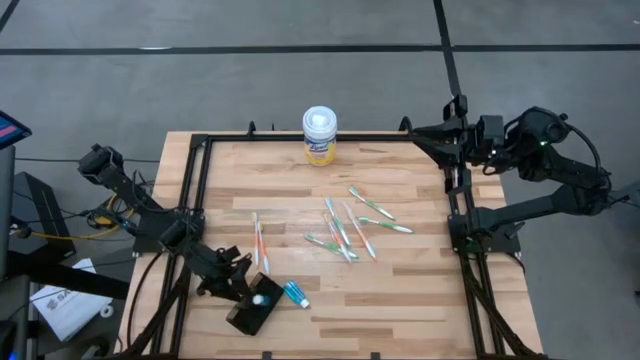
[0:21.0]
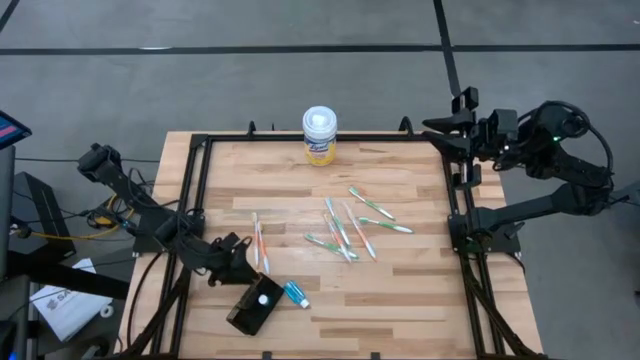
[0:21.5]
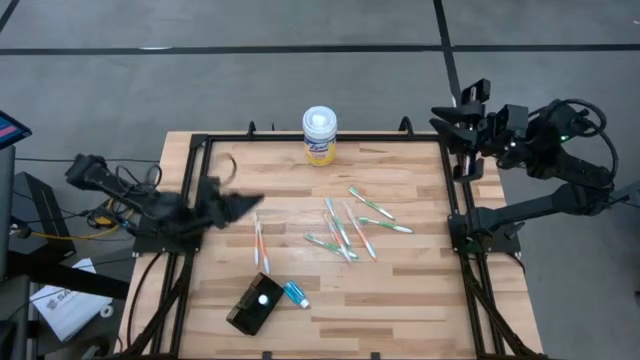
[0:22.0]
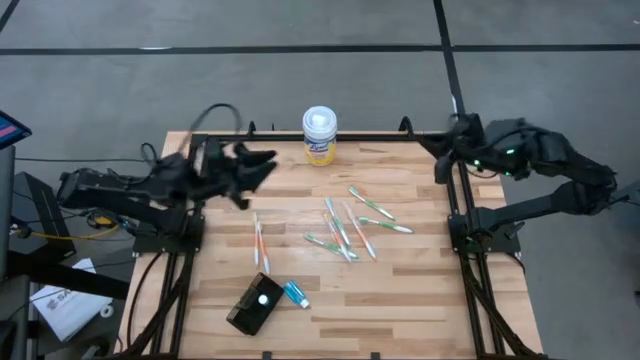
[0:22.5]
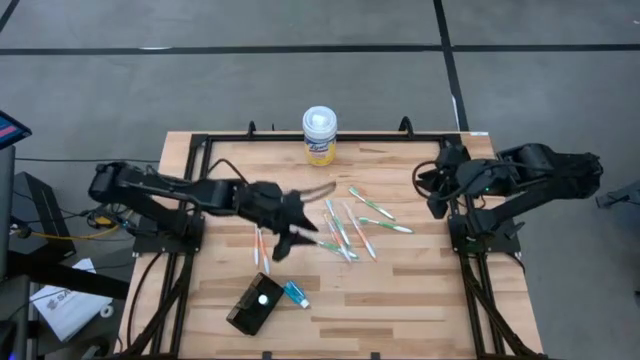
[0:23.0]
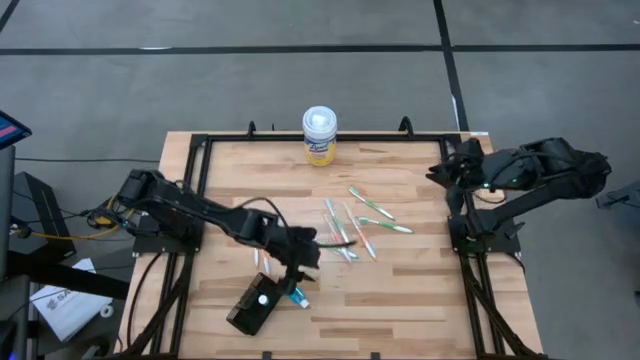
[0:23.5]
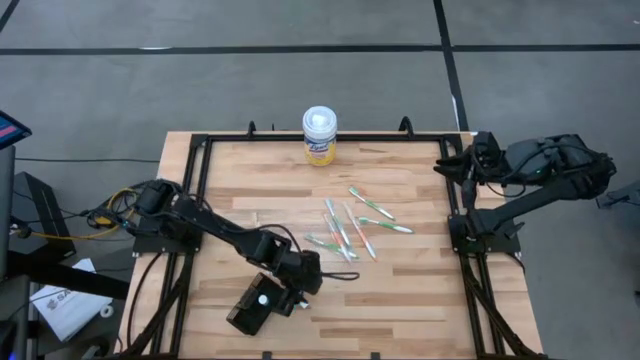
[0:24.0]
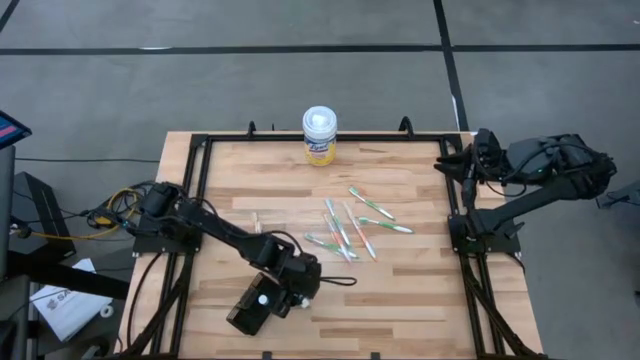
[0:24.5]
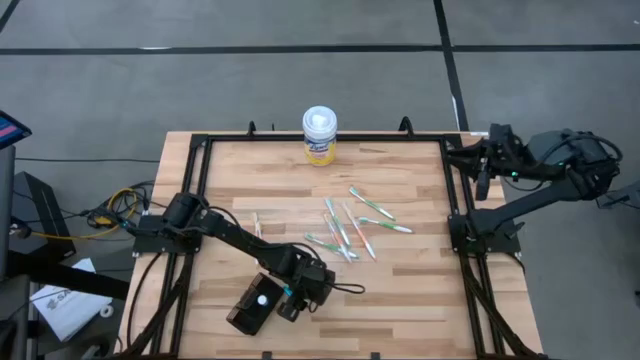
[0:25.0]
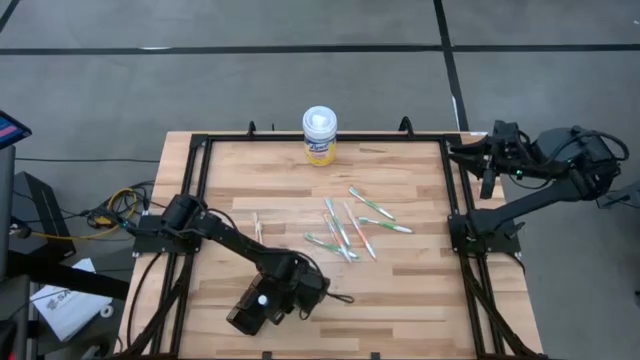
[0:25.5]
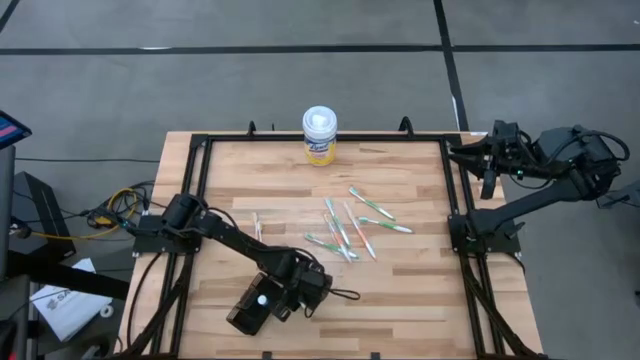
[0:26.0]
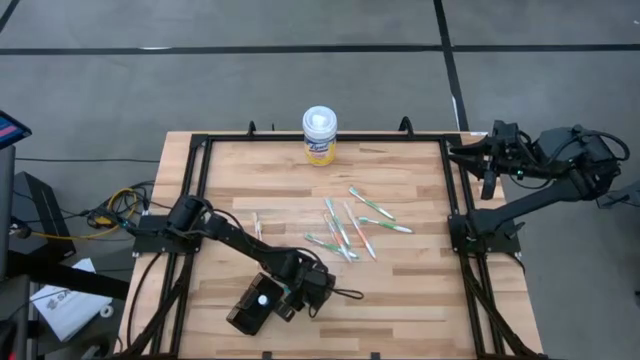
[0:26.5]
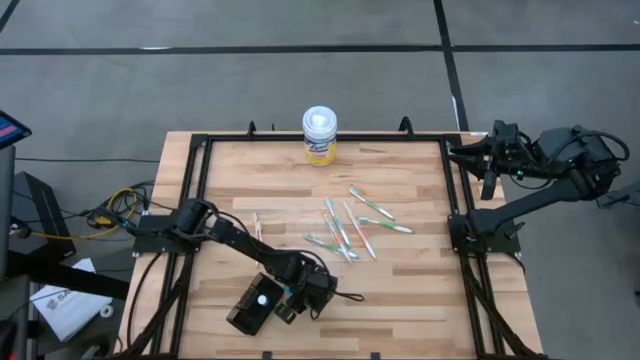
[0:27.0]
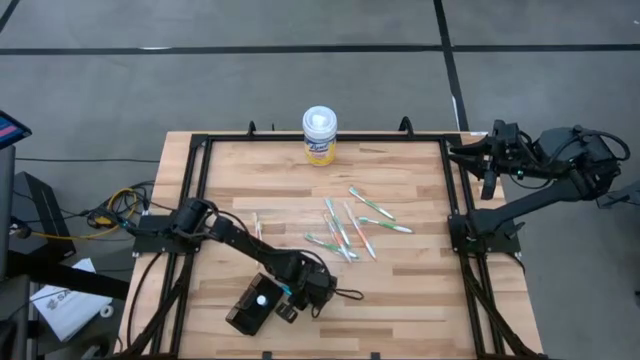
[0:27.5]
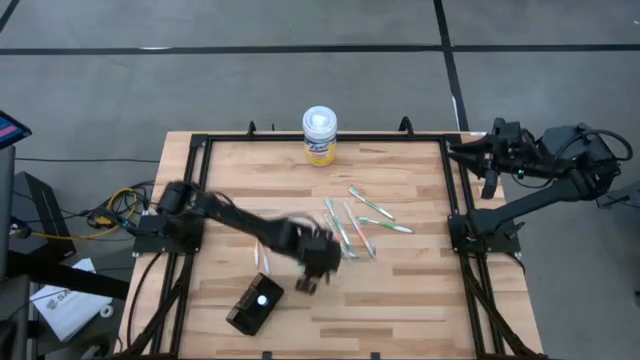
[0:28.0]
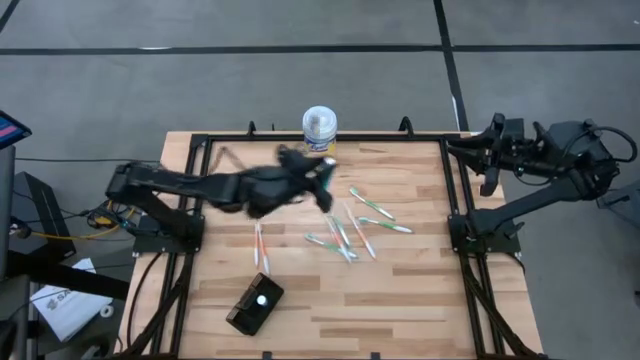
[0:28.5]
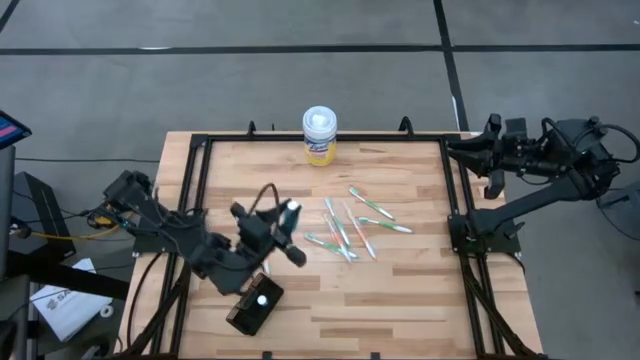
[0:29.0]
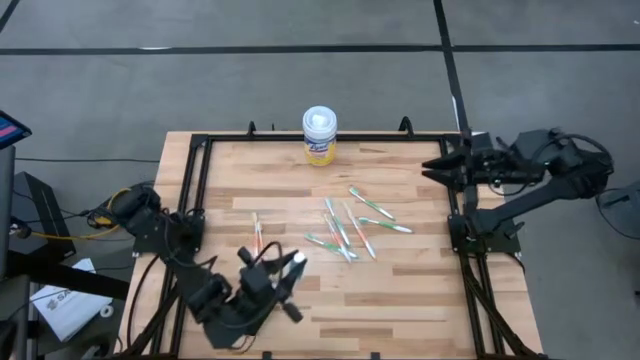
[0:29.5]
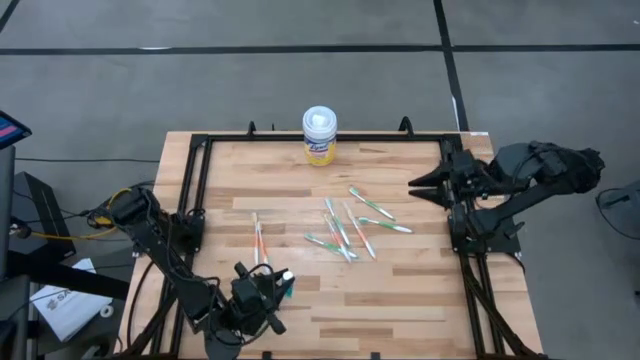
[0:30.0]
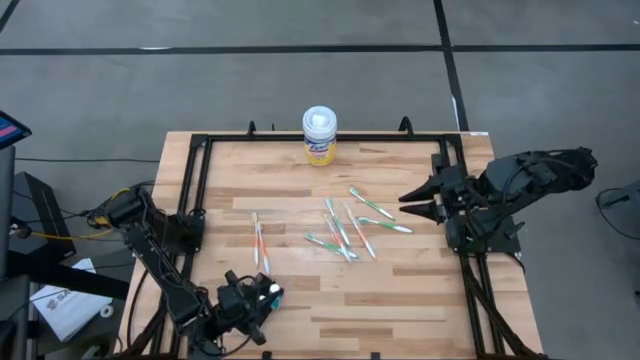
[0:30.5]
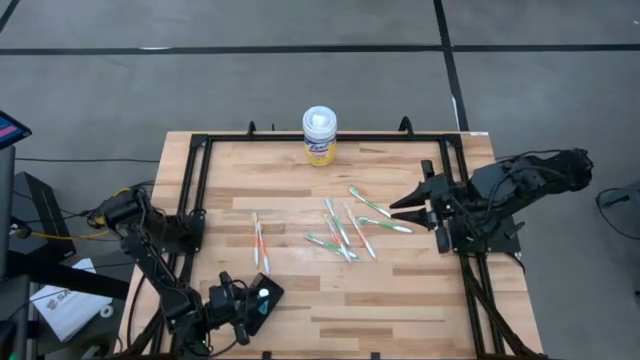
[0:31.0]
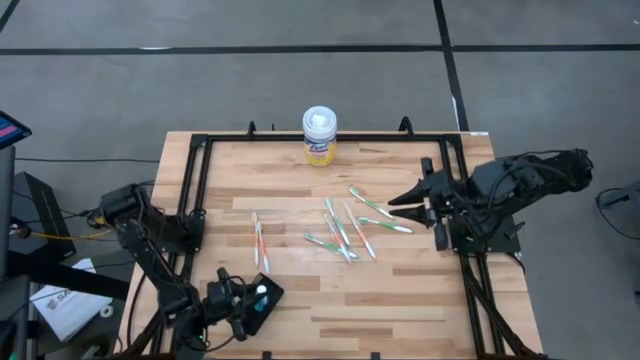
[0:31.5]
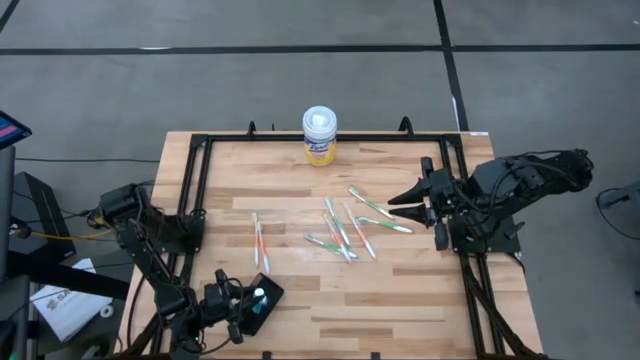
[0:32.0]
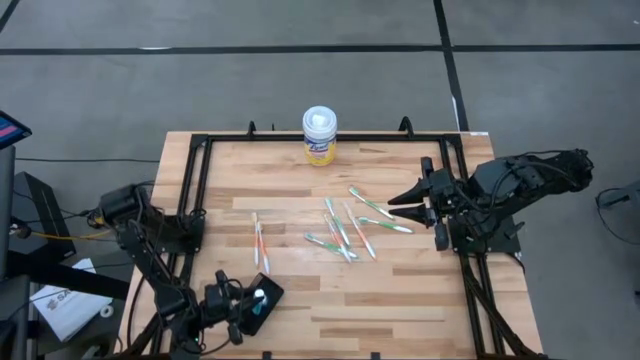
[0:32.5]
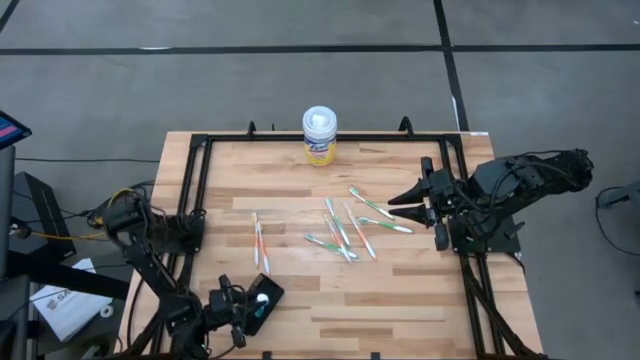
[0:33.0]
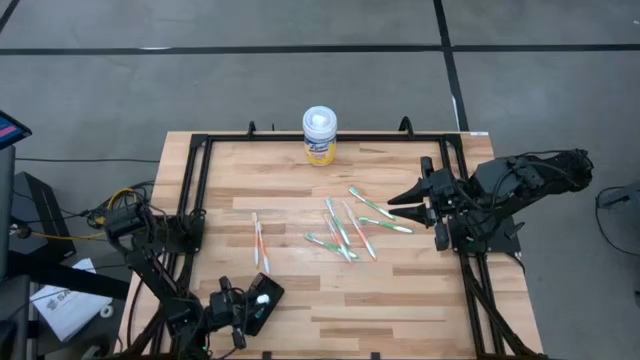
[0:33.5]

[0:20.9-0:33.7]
Task: Pick & Place toothbrushing station
Put the blue mouthwash into the black wire organizer bin

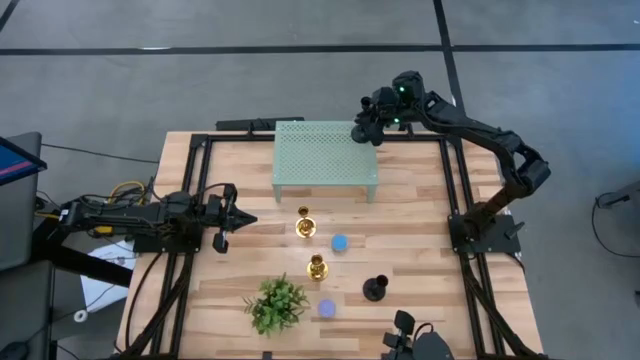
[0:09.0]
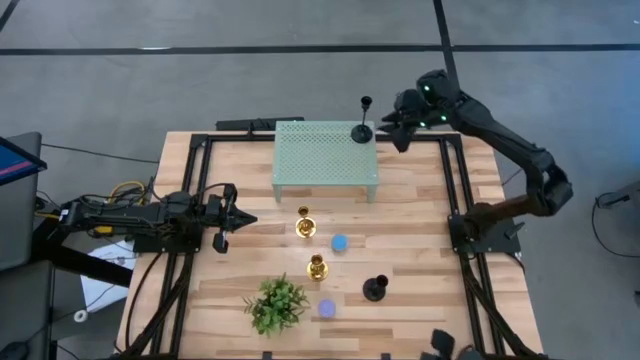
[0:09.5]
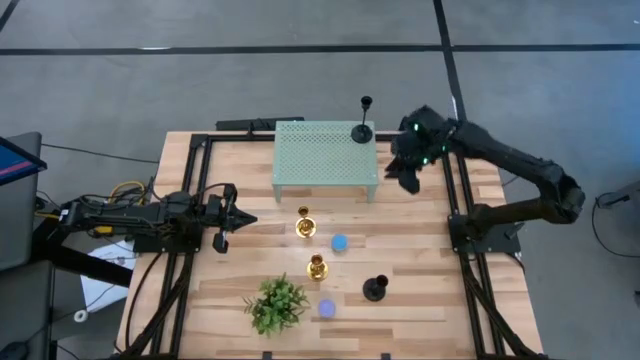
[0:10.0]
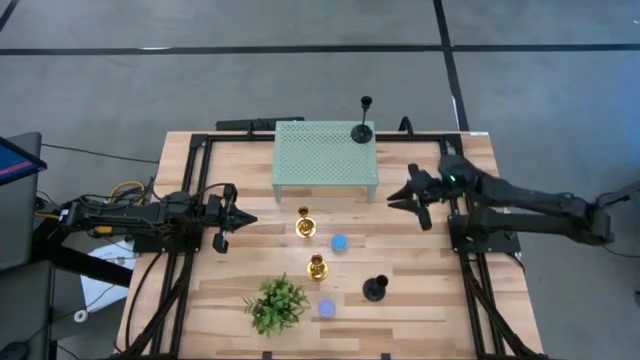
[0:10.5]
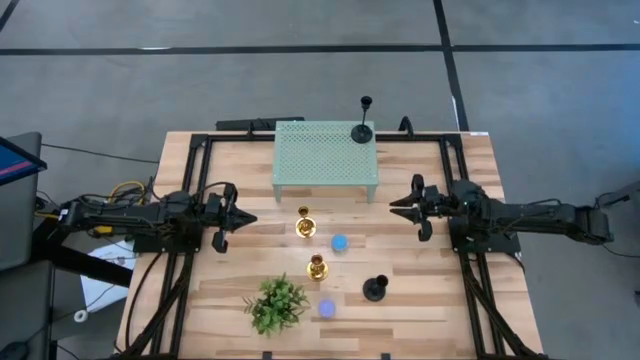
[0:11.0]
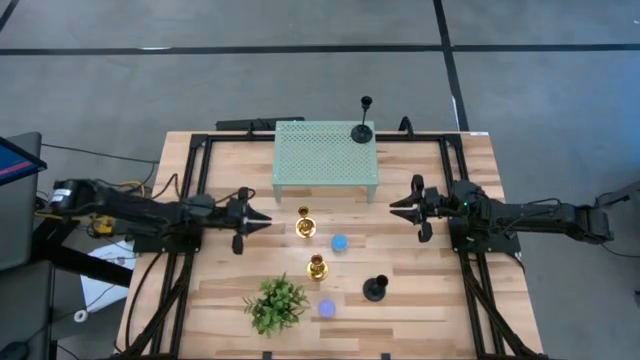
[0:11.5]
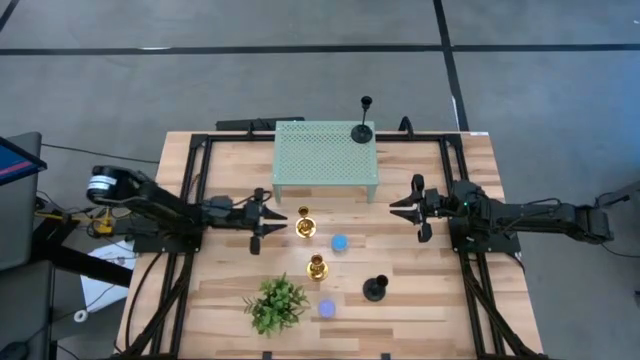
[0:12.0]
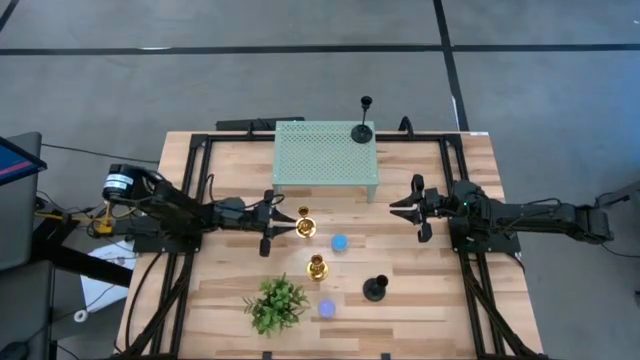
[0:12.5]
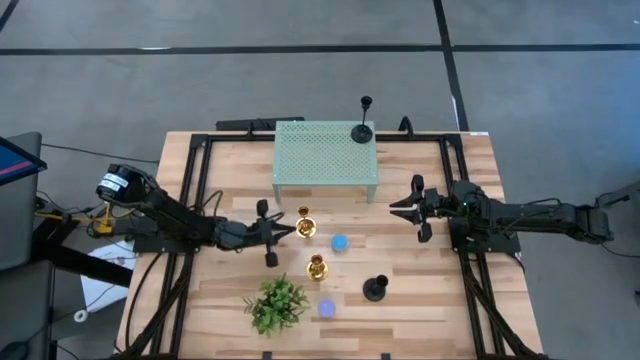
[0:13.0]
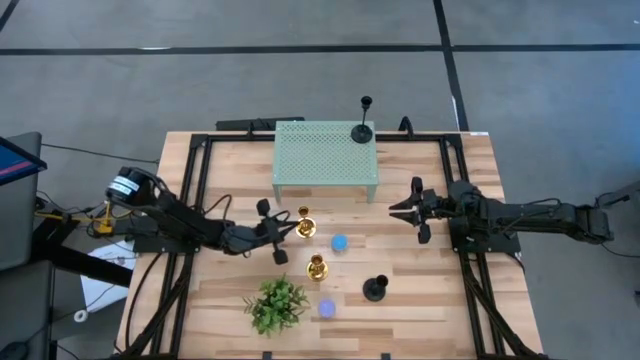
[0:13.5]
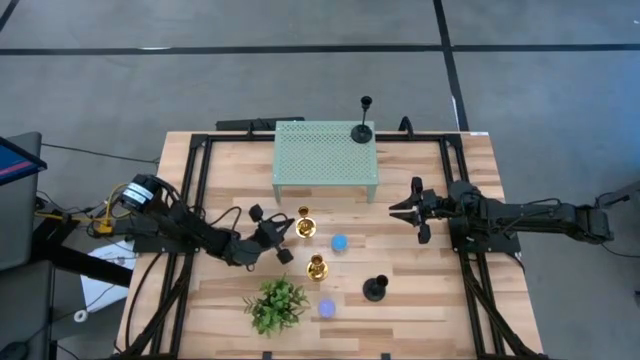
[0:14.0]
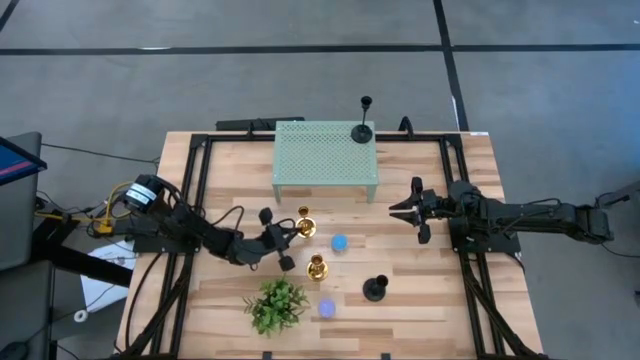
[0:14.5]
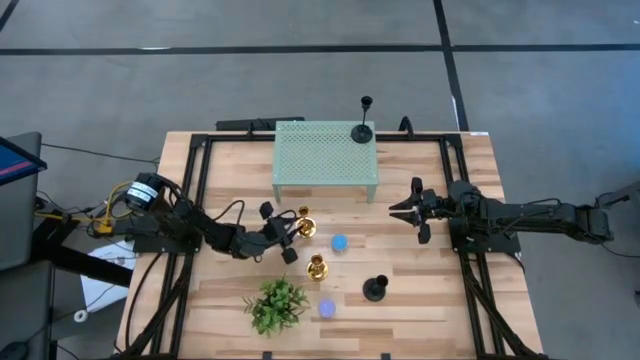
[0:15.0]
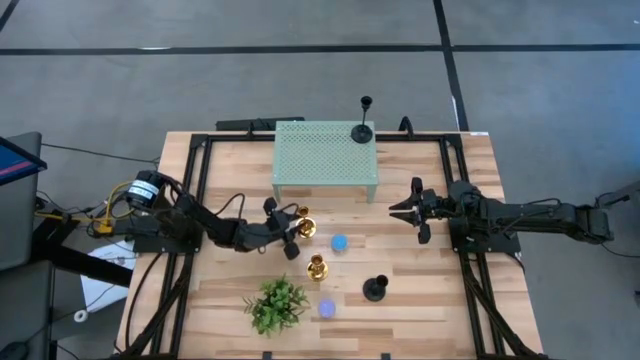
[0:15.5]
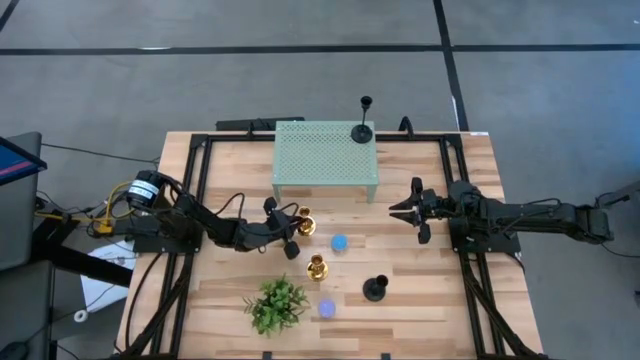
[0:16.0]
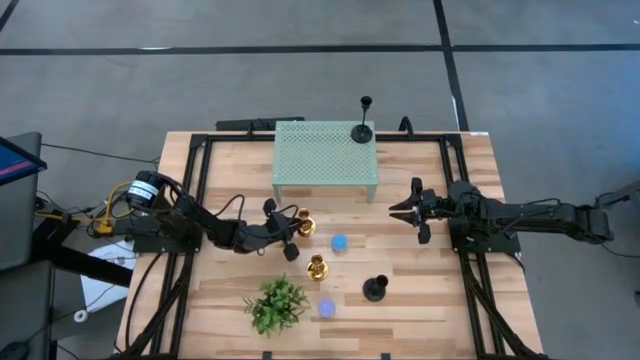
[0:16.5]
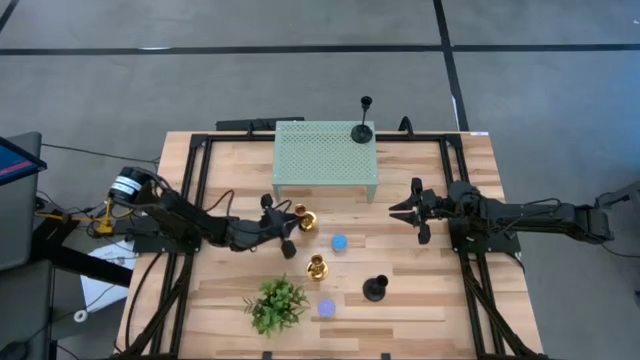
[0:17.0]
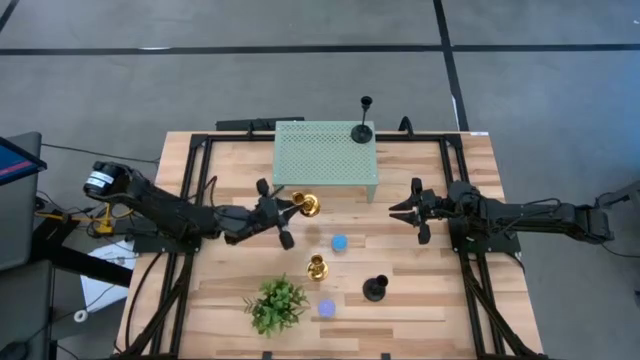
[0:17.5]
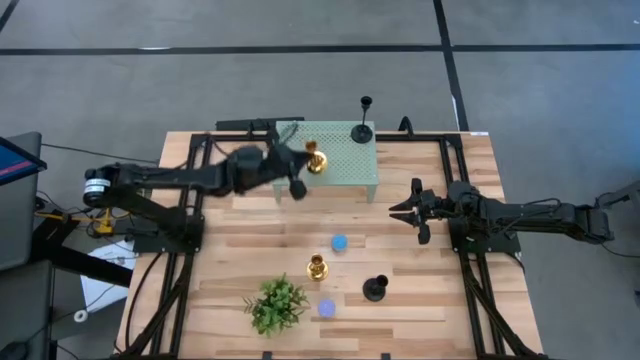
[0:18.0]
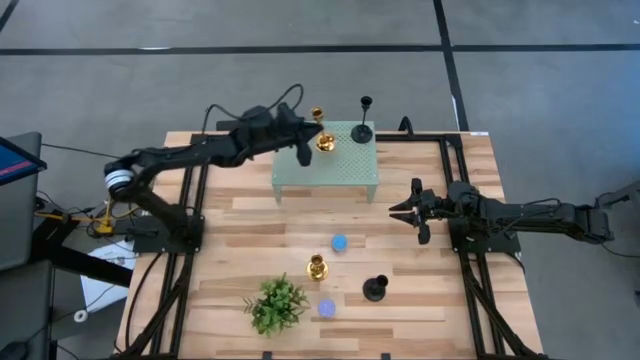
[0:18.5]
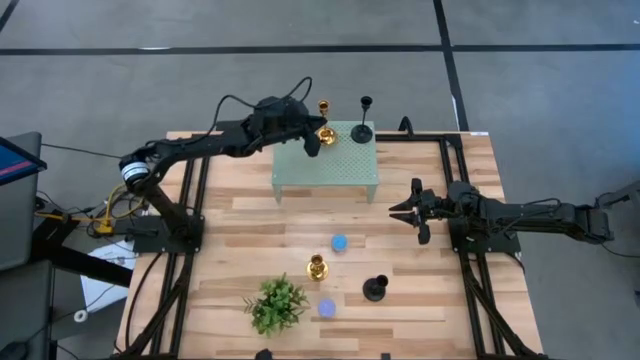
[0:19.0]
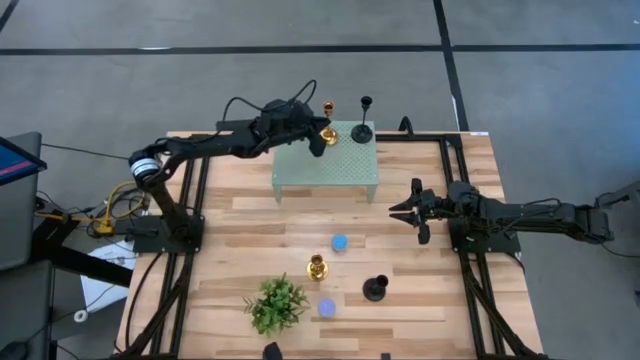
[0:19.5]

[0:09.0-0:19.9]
Task: Pick & Place candle stick holders
Put the gold candlestick on the shelf
